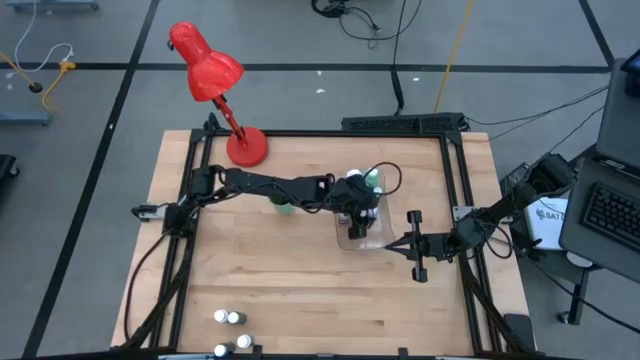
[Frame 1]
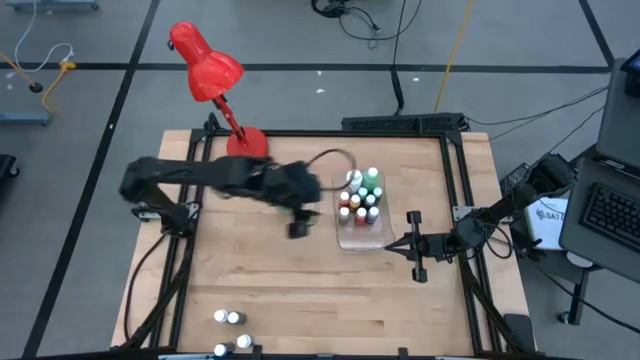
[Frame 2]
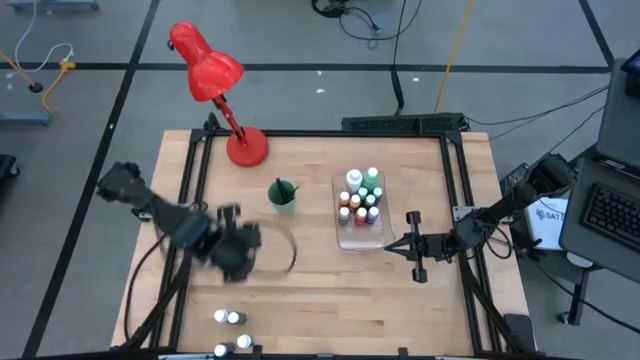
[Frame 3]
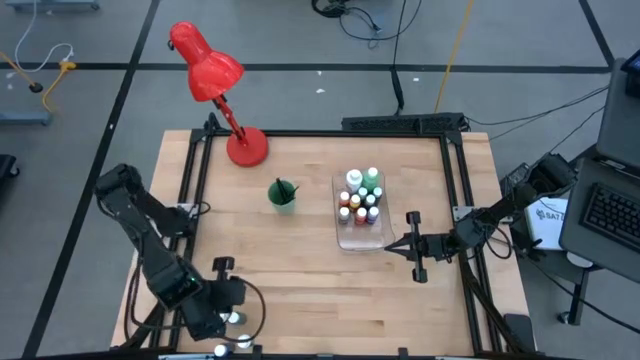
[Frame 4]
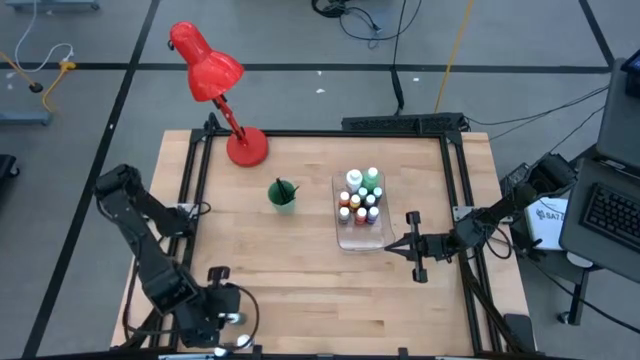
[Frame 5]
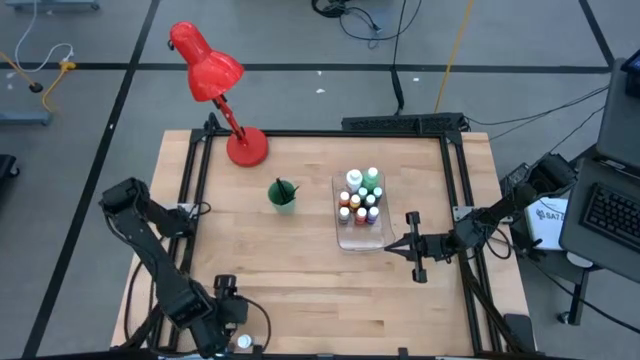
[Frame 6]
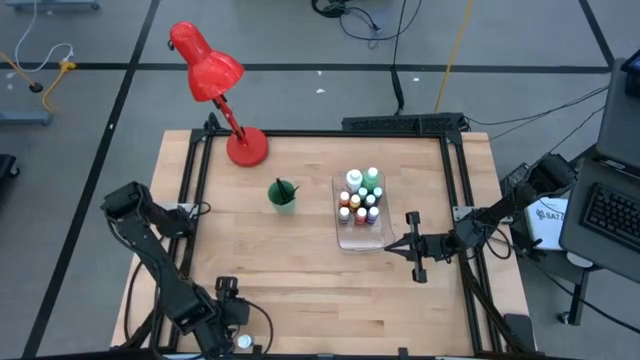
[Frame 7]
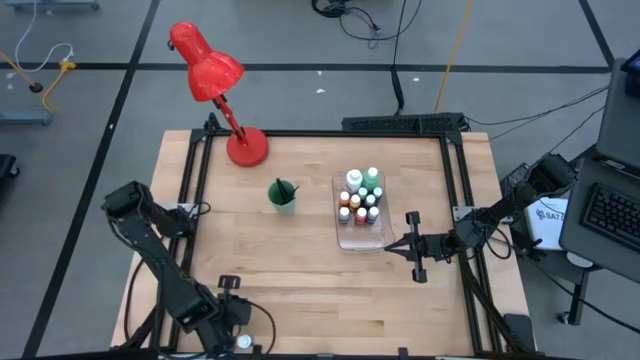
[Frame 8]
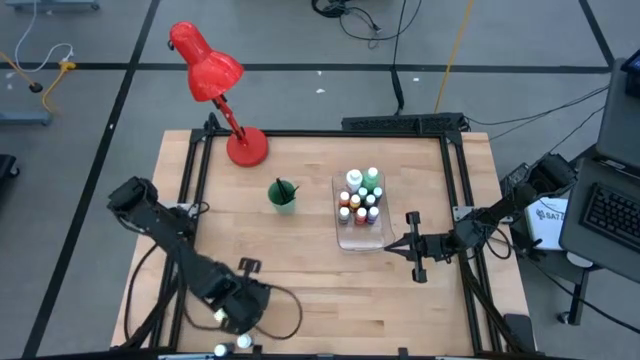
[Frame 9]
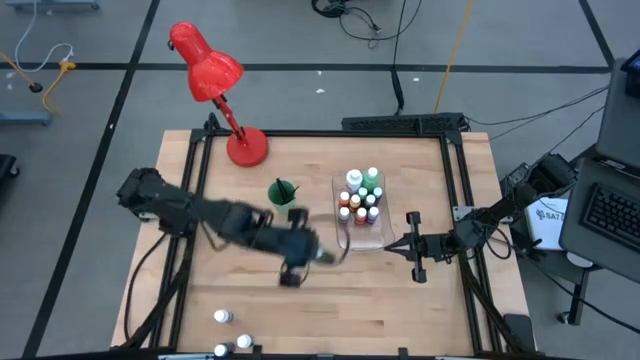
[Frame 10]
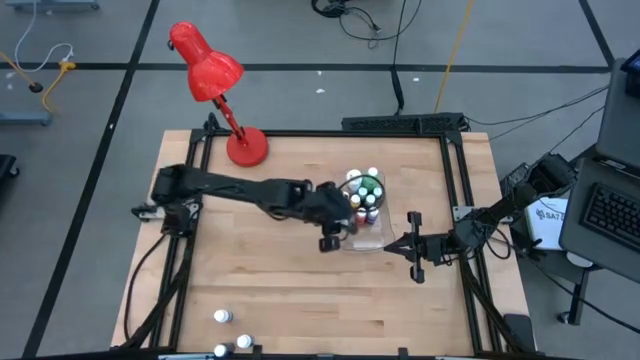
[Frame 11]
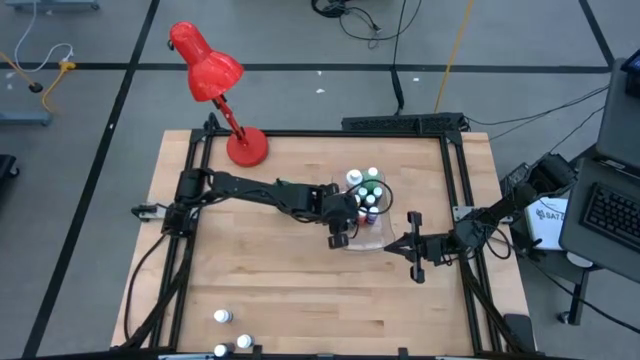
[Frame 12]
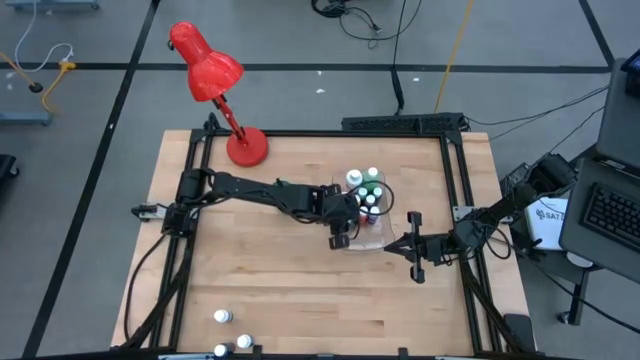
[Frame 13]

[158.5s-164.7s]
Task: Pick & Place Paint Supplies
Put the small green paint bottle into the transparent bin

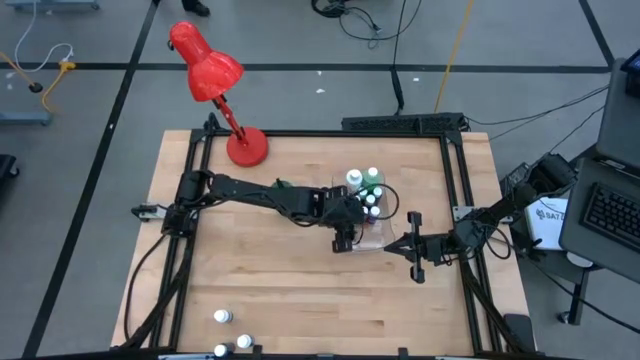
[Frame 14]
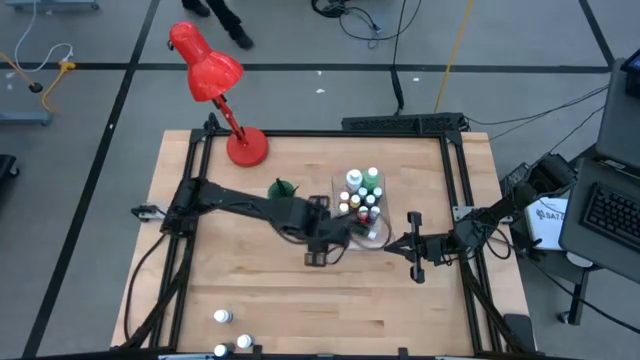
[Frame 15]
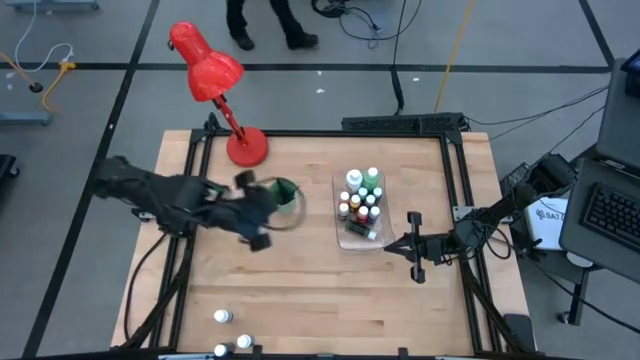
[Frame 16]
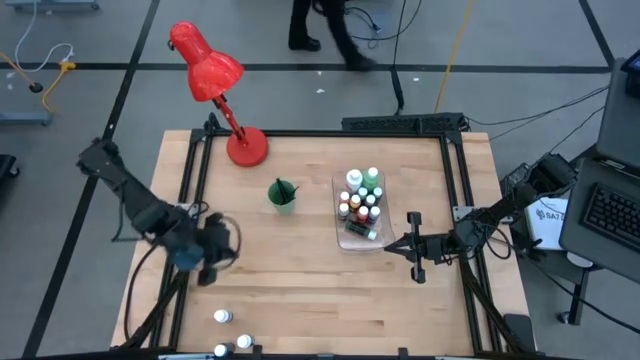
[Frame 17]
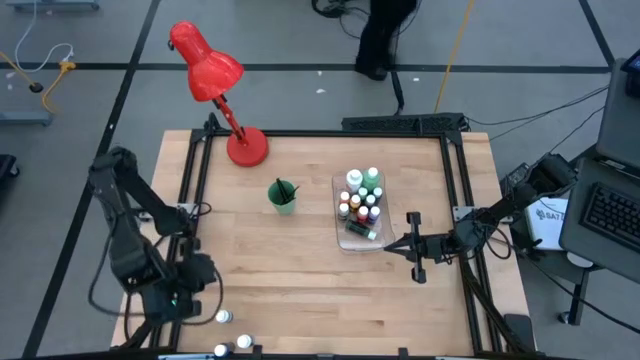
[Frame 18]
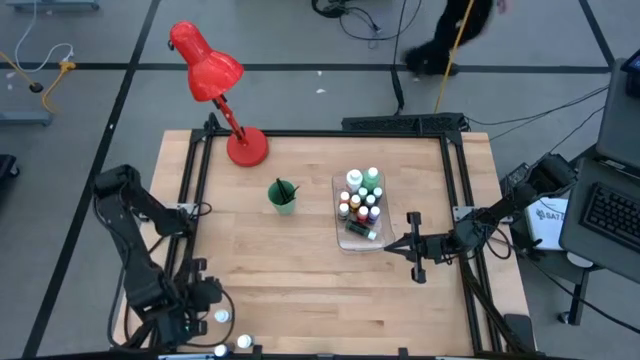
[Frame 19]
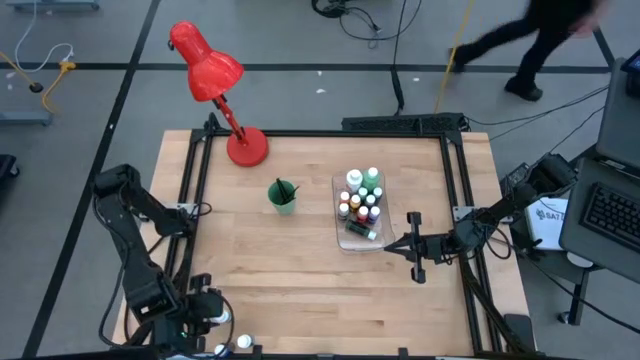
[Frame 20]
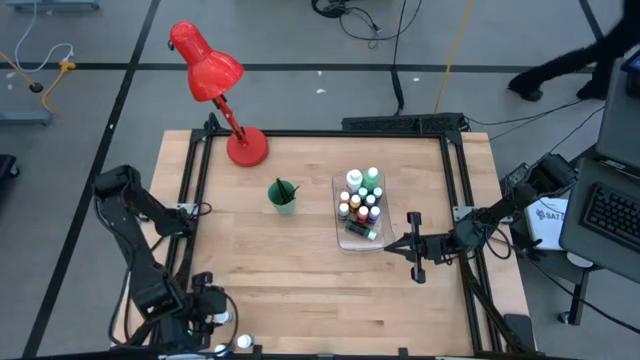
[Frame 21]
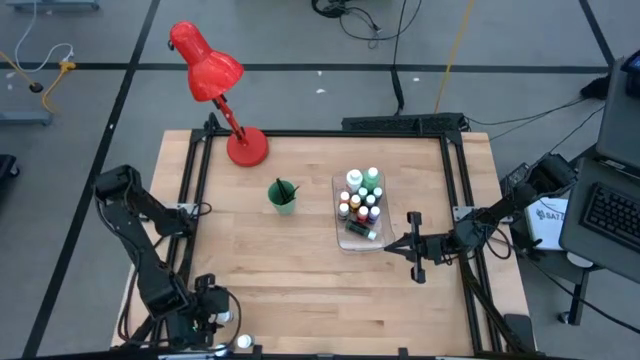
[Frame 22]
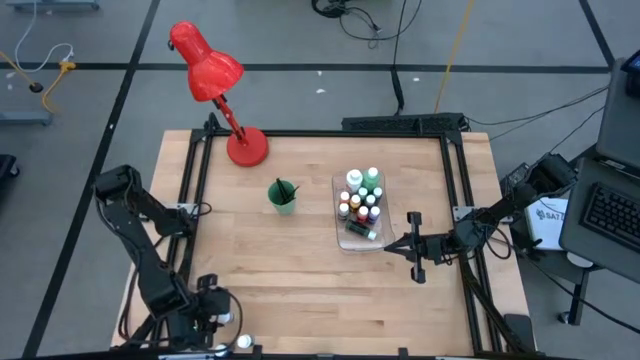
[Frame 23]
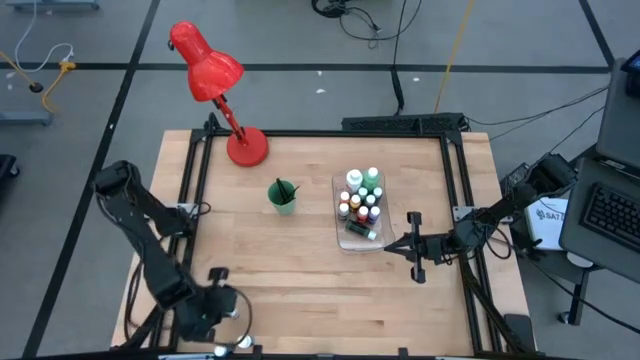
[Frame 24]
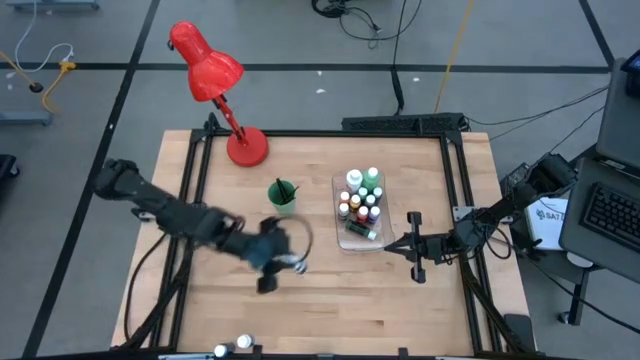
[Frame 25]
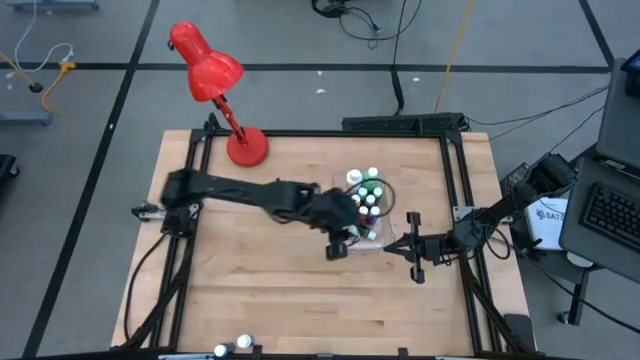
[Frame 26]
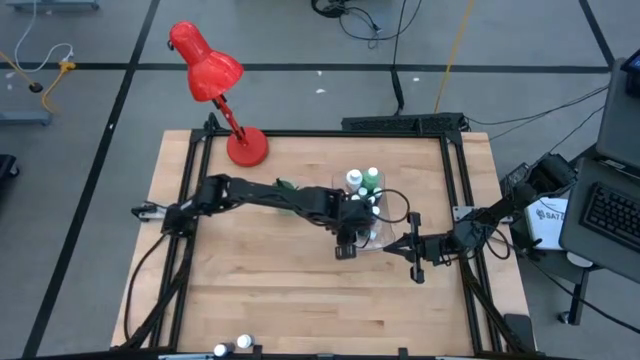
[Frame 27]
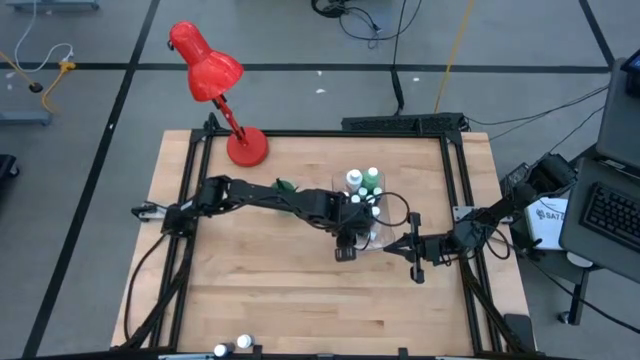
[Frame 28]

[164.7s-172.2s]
Put the small white paint bottle into the transparent bin

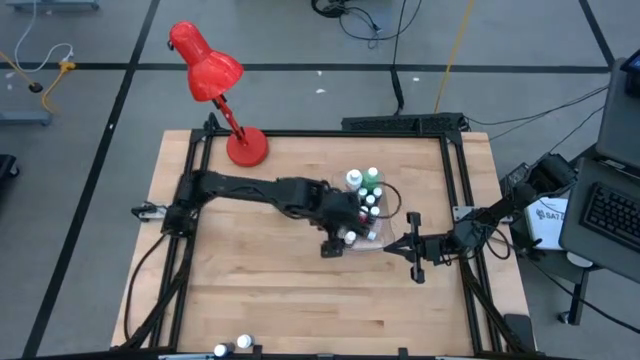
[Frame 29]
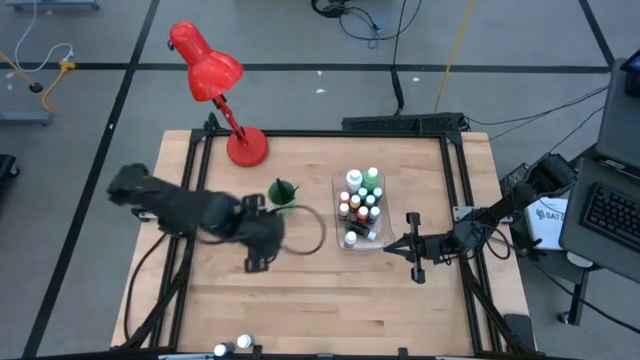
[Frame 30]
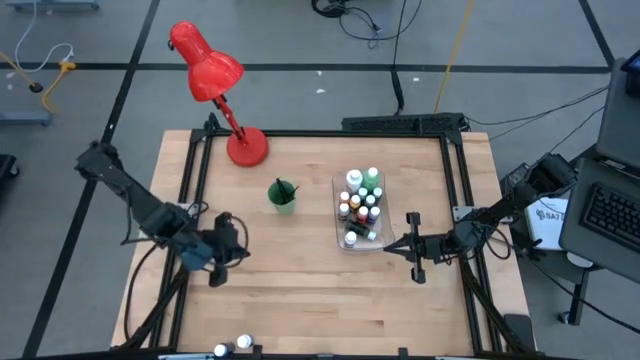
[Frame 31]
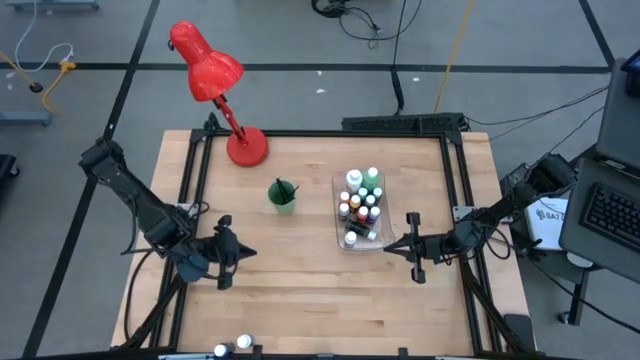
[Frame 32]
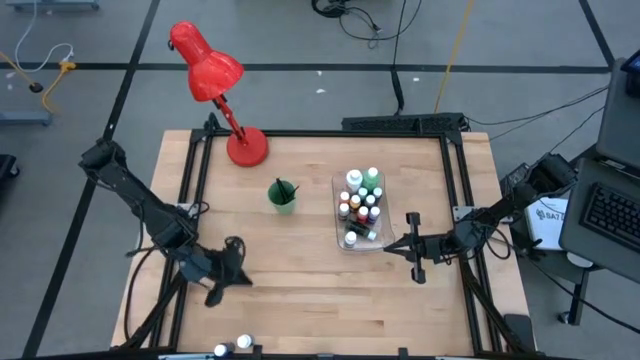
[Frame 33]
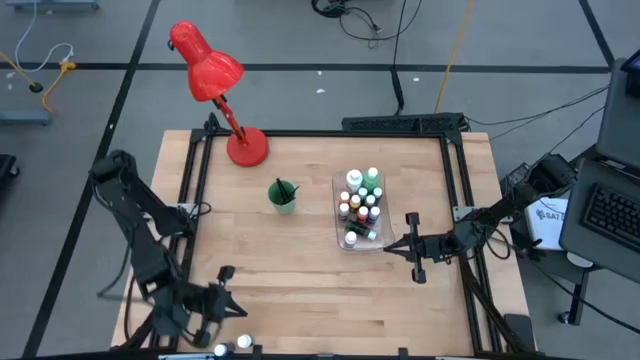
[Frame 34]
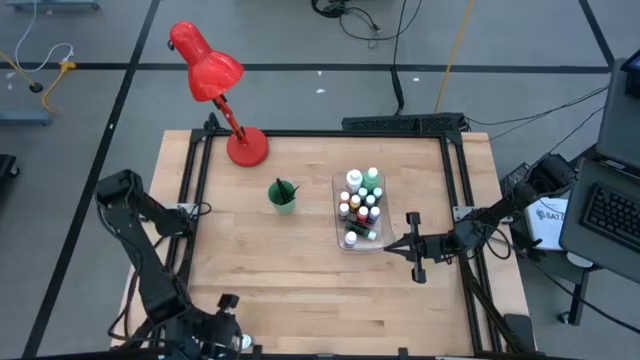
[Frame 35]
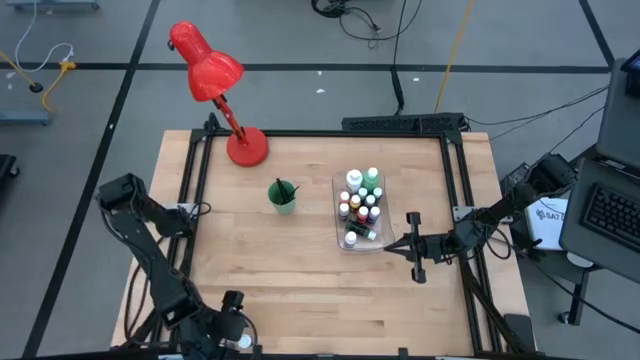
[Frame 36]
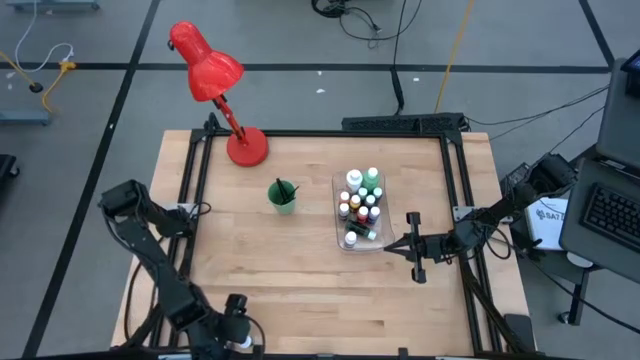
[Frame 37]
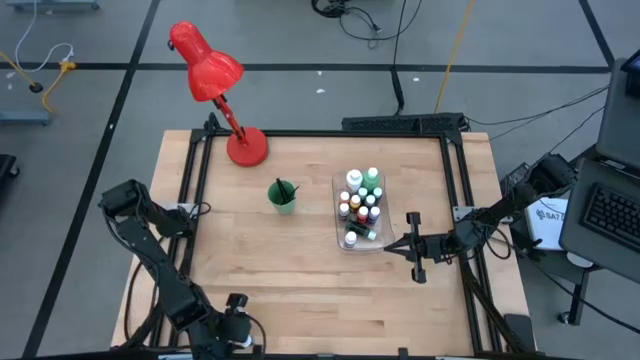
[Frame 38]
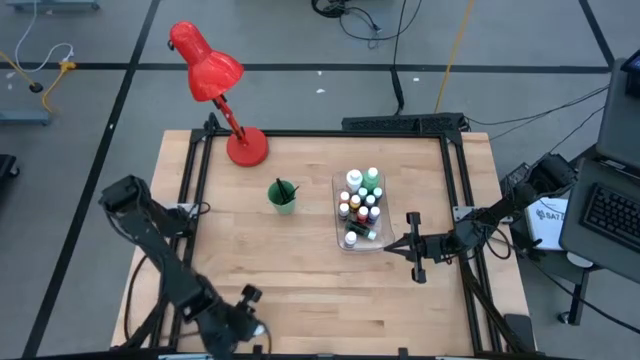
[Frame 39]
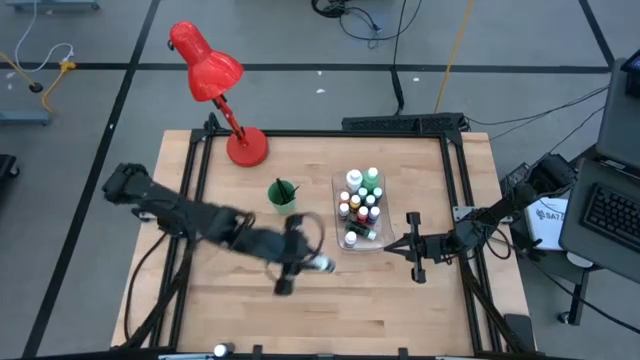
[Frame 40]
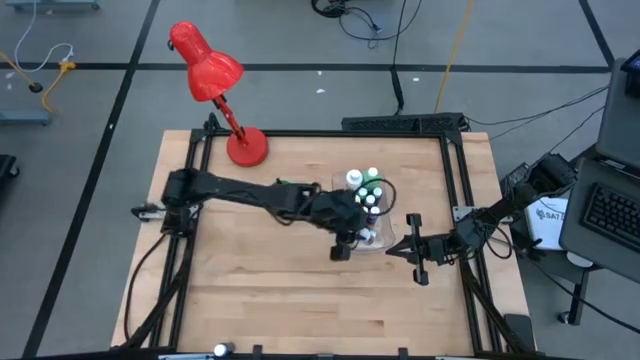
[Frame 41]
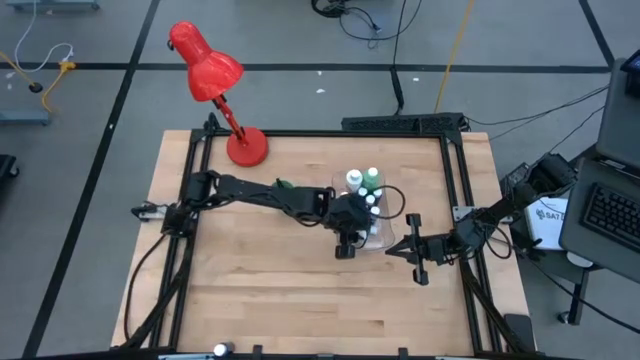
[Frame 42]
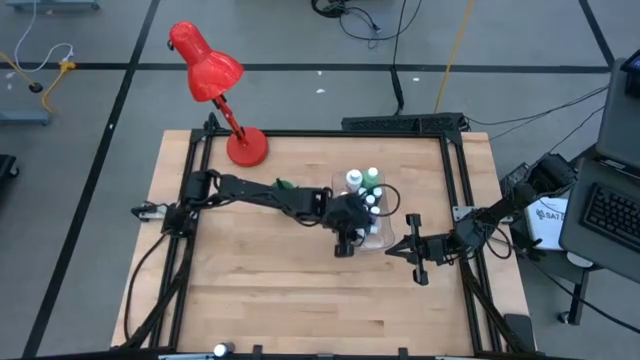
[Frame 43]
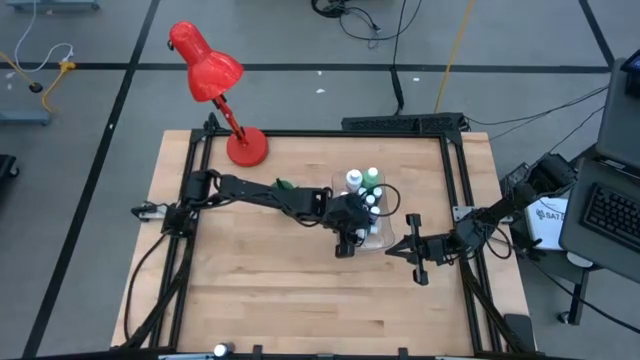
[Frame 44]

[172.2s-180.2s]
Put the small white paint bottle into the transparent bin

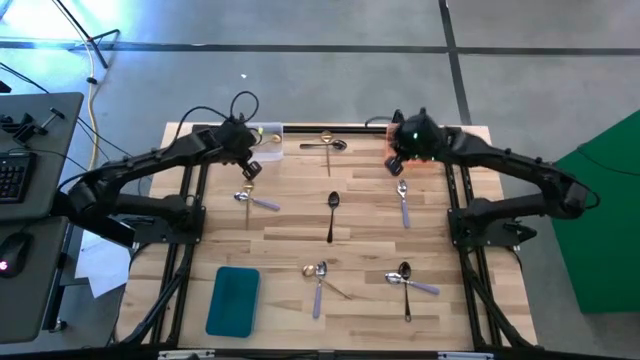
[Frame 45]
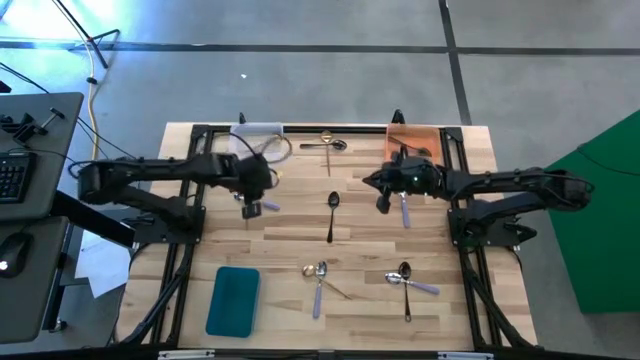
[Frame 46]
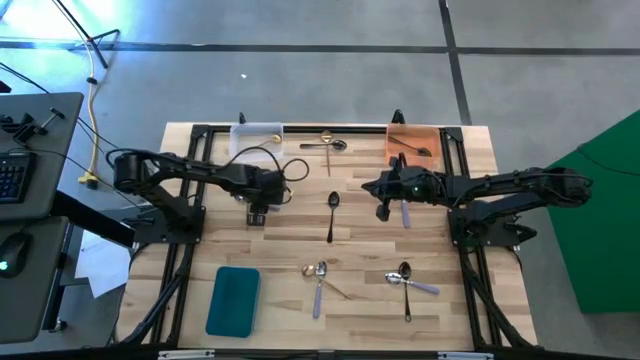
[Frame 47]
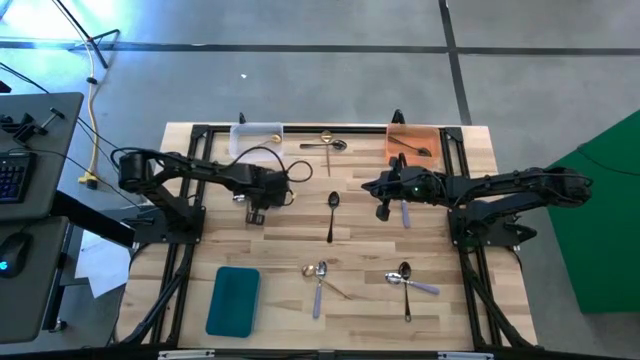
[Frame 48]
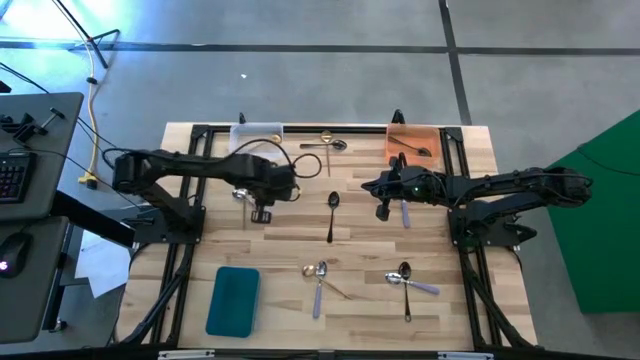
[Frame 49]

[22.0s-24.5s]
Task: Sort silverware by color (type)
Put the middle left purple spoon into the blue bin
